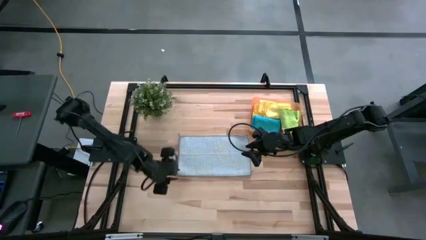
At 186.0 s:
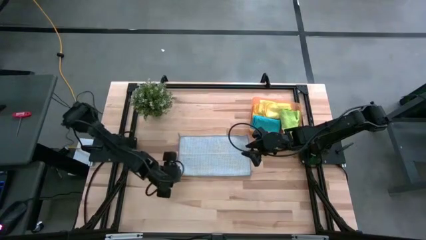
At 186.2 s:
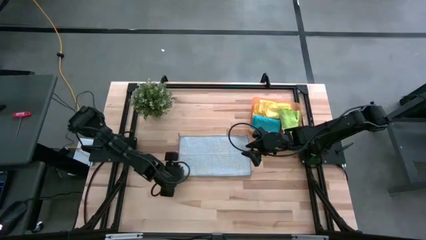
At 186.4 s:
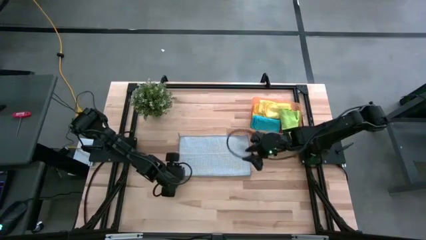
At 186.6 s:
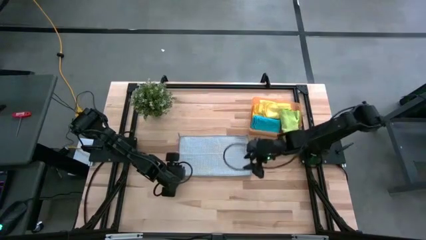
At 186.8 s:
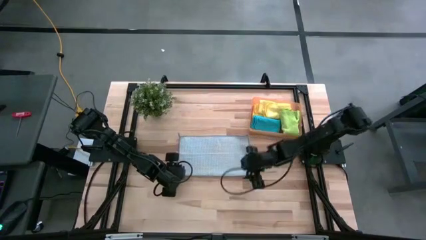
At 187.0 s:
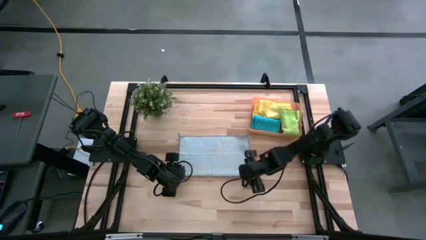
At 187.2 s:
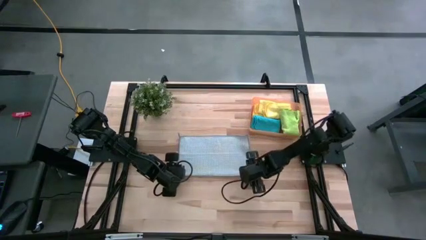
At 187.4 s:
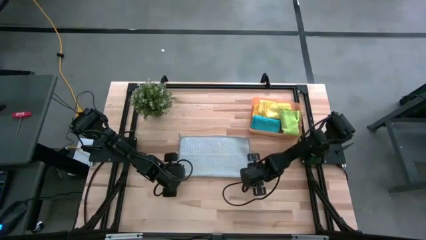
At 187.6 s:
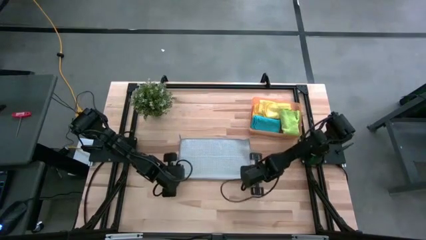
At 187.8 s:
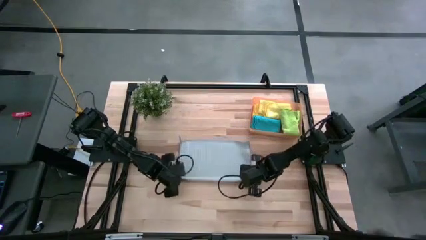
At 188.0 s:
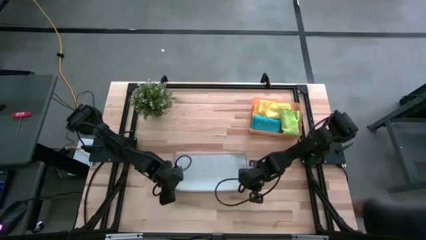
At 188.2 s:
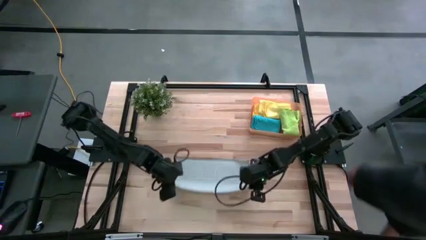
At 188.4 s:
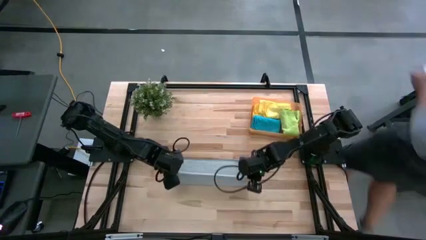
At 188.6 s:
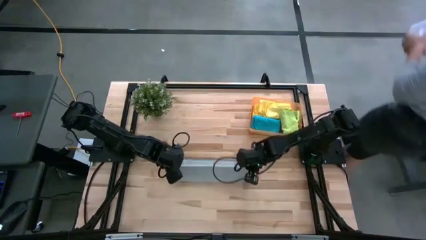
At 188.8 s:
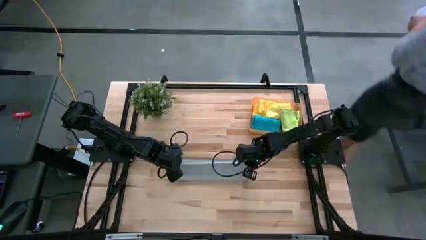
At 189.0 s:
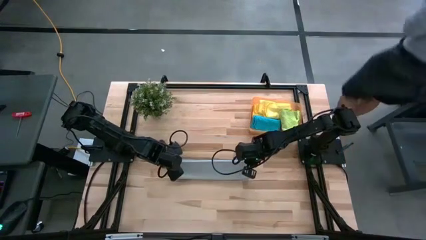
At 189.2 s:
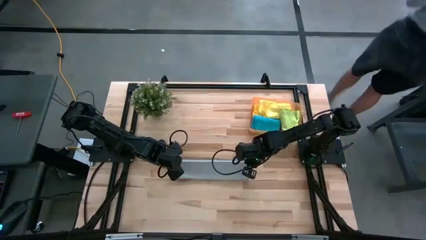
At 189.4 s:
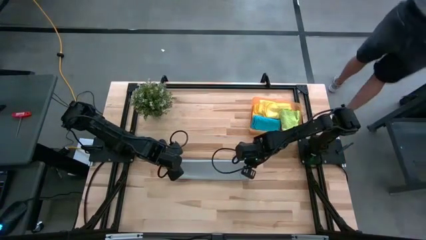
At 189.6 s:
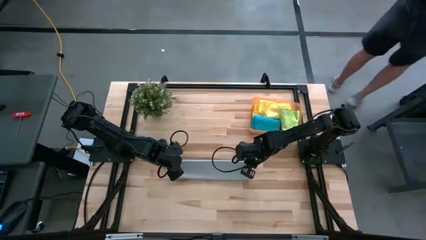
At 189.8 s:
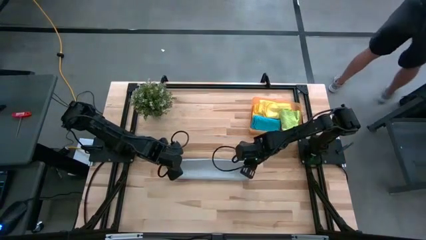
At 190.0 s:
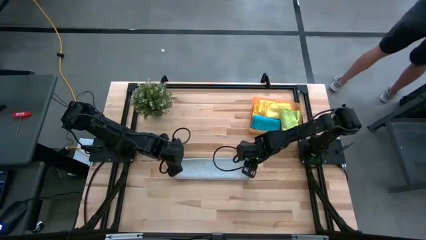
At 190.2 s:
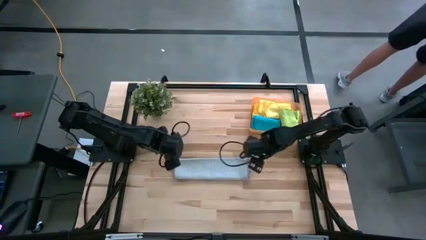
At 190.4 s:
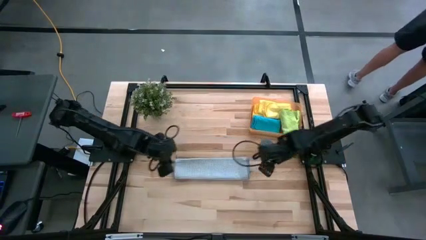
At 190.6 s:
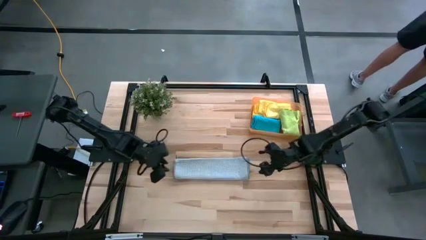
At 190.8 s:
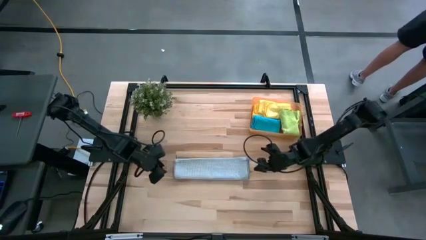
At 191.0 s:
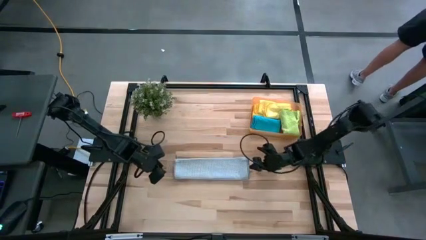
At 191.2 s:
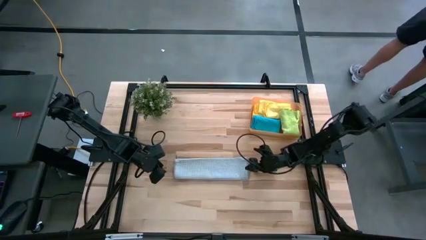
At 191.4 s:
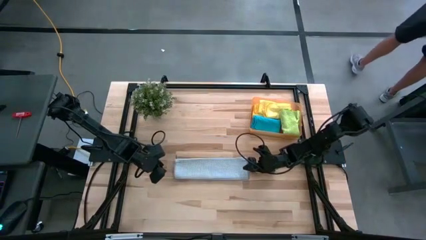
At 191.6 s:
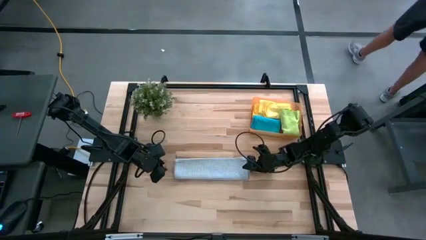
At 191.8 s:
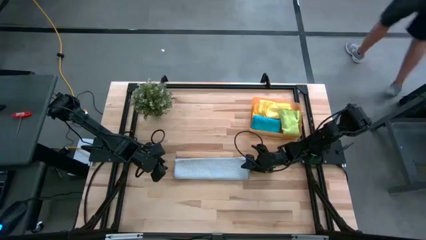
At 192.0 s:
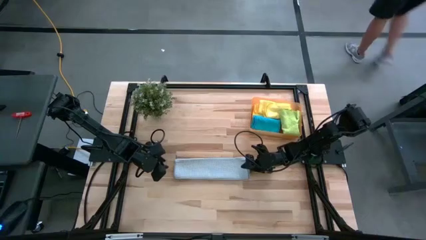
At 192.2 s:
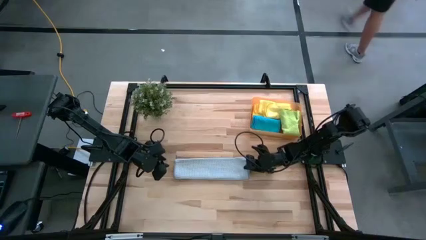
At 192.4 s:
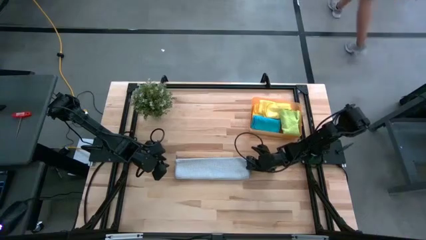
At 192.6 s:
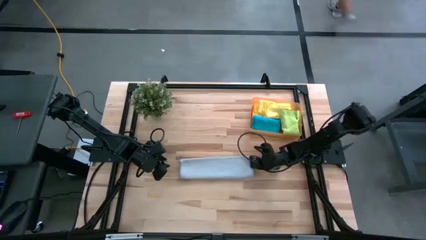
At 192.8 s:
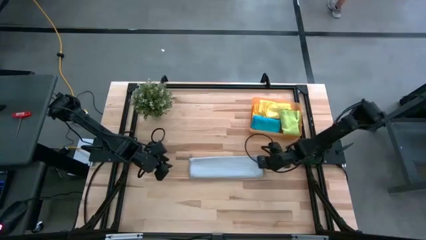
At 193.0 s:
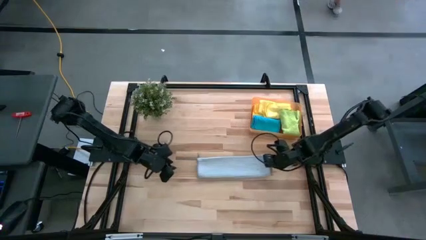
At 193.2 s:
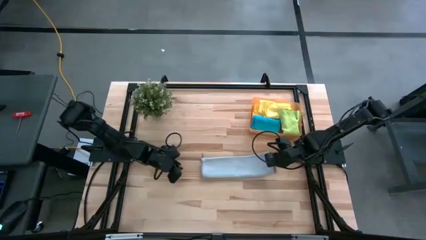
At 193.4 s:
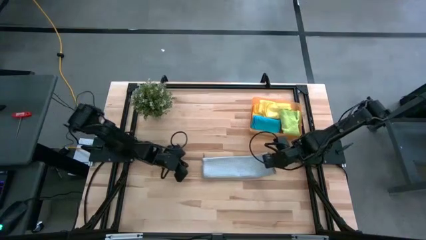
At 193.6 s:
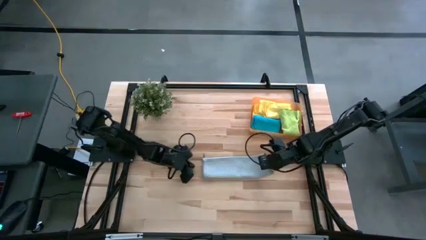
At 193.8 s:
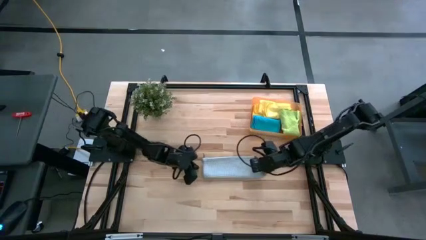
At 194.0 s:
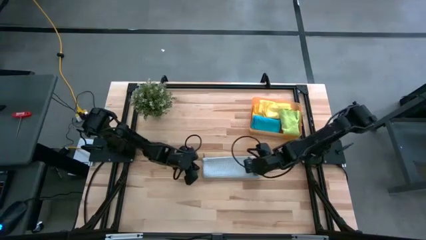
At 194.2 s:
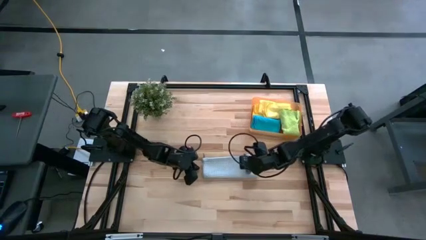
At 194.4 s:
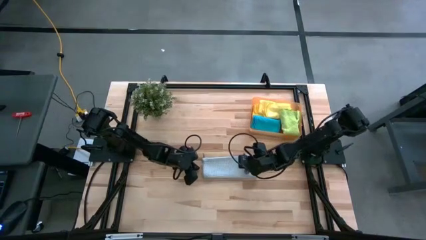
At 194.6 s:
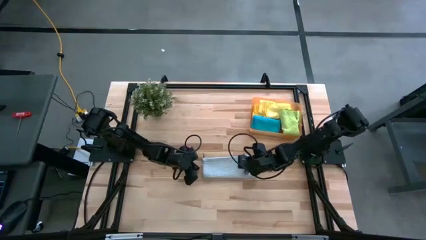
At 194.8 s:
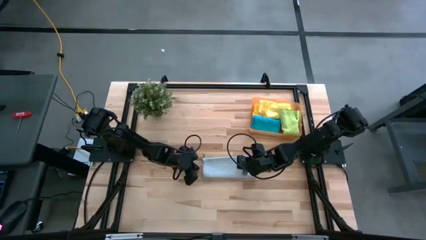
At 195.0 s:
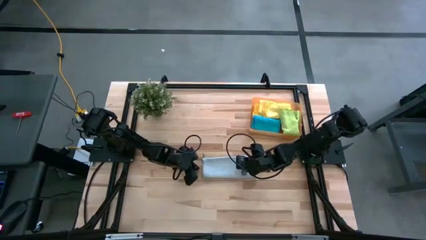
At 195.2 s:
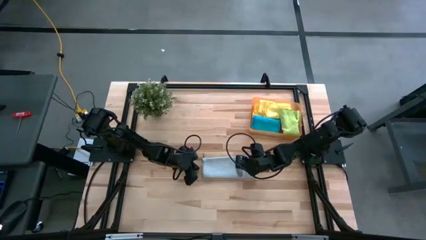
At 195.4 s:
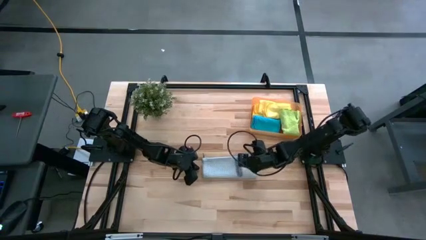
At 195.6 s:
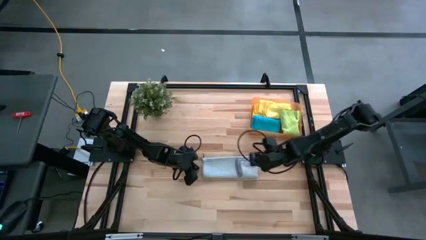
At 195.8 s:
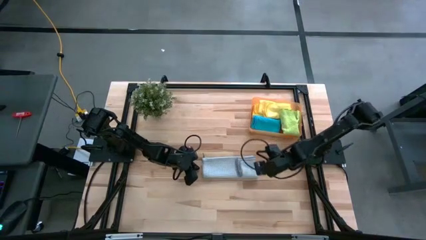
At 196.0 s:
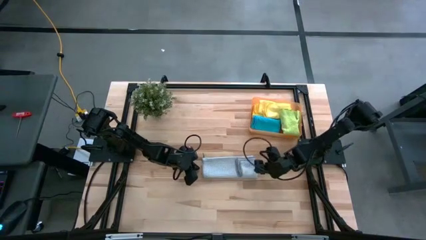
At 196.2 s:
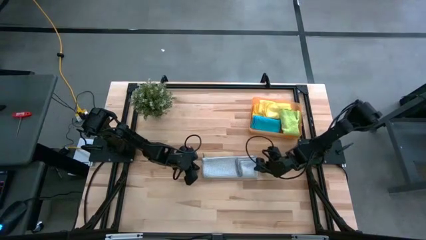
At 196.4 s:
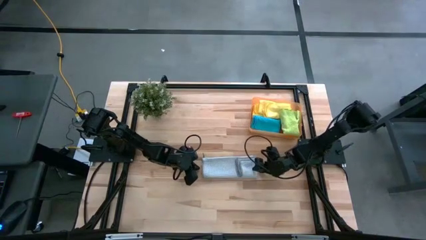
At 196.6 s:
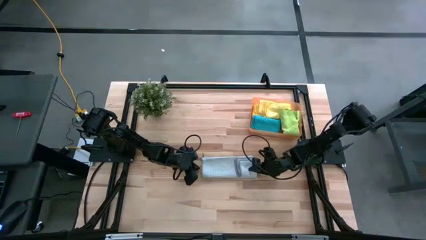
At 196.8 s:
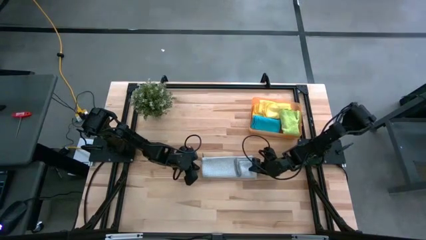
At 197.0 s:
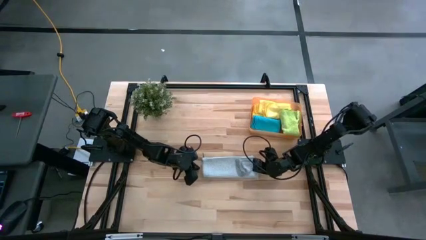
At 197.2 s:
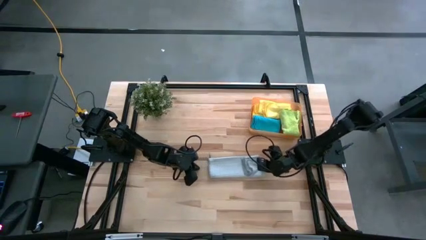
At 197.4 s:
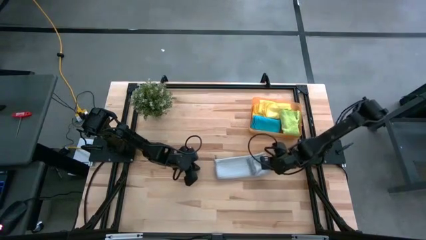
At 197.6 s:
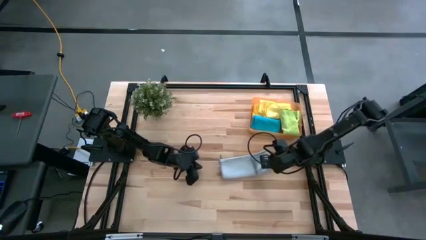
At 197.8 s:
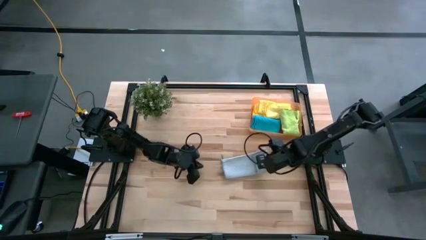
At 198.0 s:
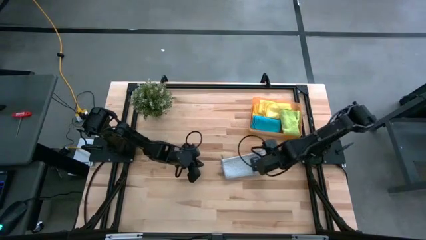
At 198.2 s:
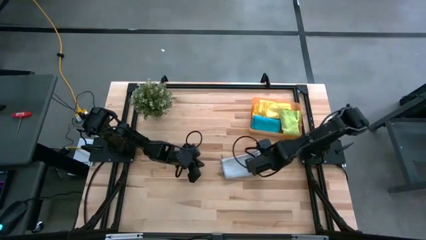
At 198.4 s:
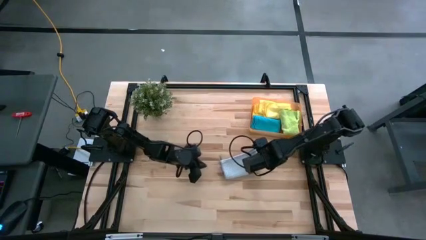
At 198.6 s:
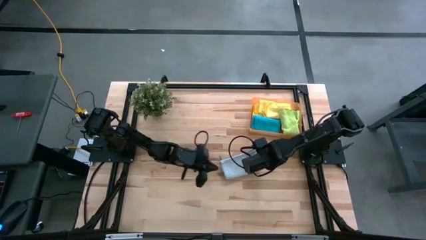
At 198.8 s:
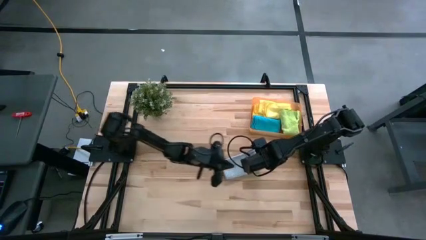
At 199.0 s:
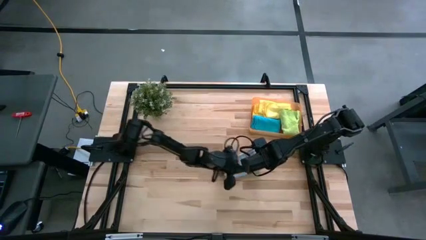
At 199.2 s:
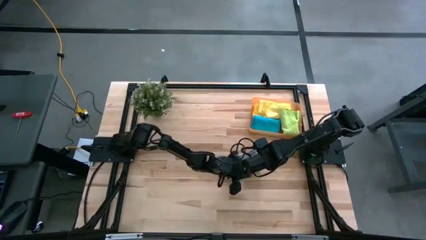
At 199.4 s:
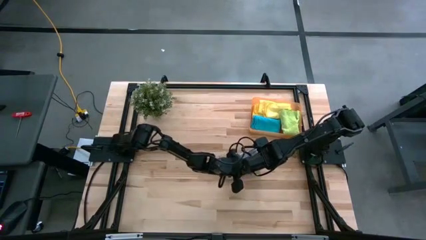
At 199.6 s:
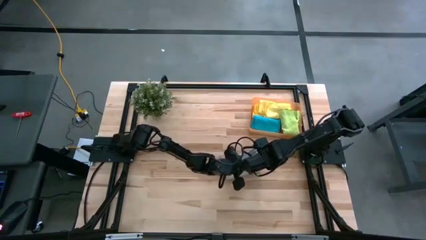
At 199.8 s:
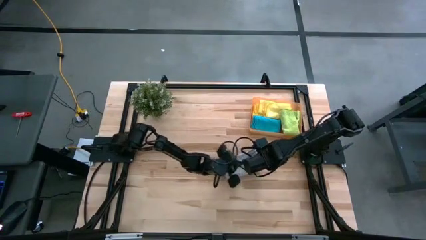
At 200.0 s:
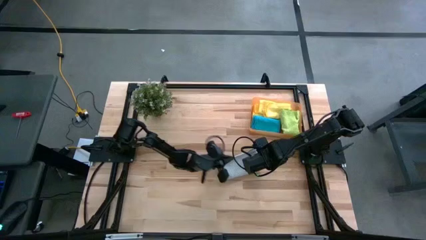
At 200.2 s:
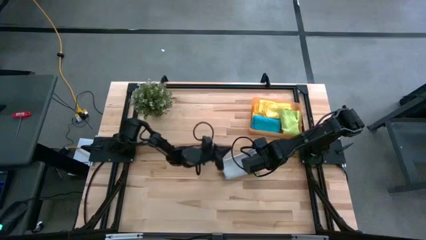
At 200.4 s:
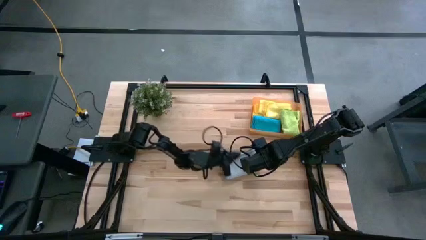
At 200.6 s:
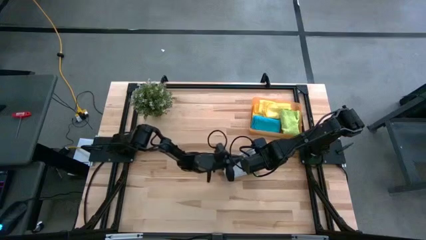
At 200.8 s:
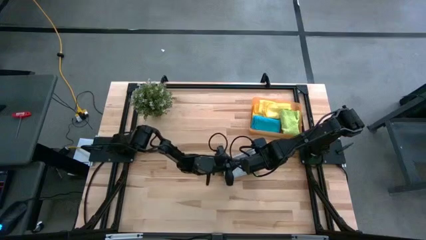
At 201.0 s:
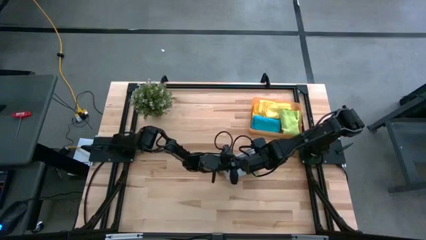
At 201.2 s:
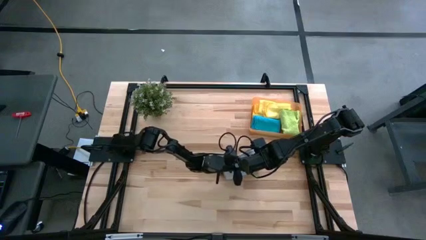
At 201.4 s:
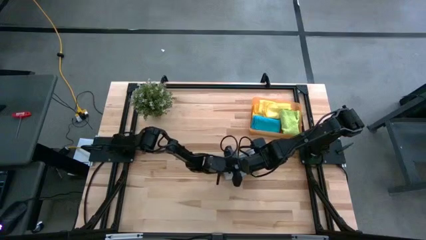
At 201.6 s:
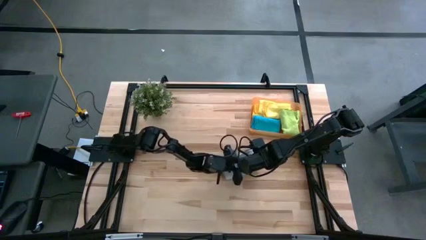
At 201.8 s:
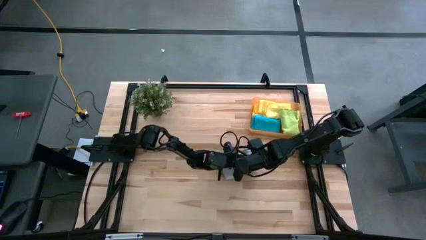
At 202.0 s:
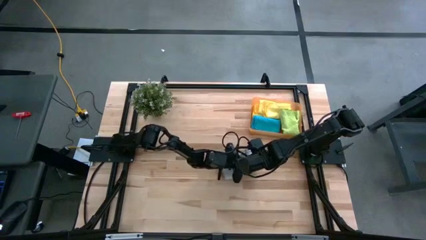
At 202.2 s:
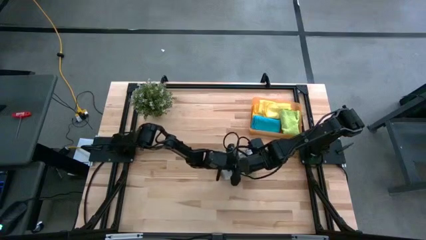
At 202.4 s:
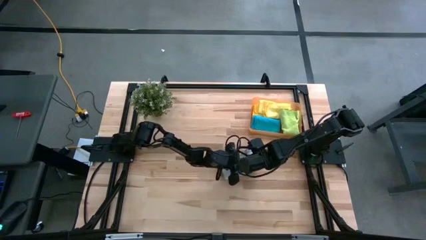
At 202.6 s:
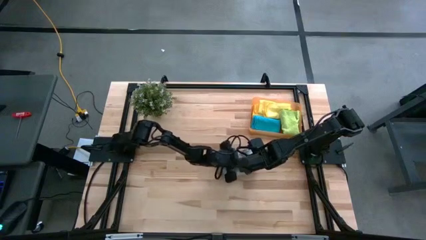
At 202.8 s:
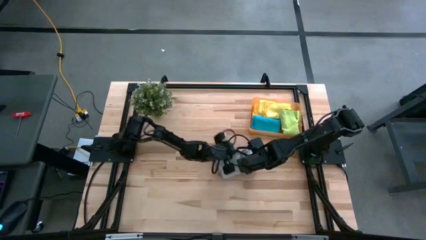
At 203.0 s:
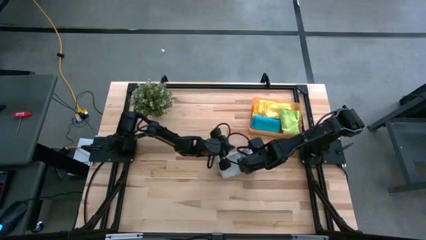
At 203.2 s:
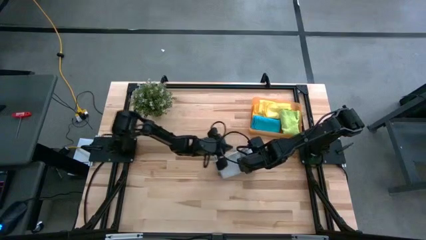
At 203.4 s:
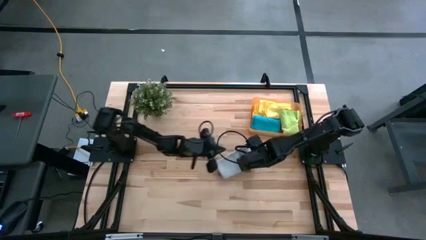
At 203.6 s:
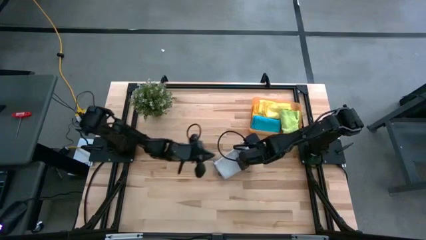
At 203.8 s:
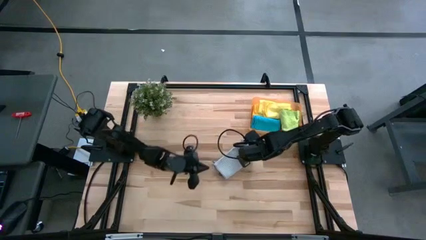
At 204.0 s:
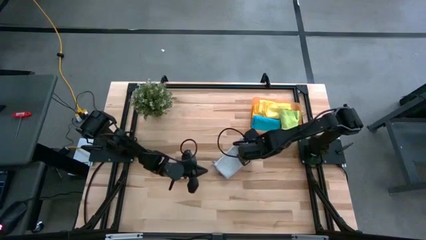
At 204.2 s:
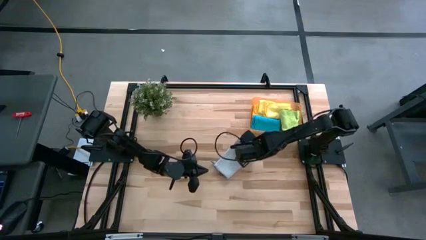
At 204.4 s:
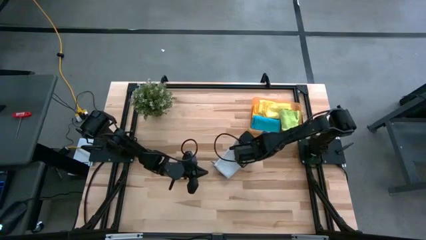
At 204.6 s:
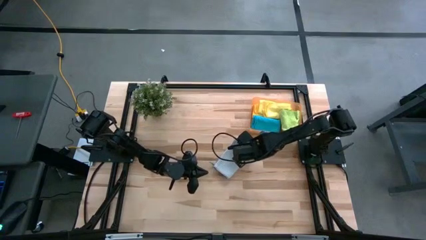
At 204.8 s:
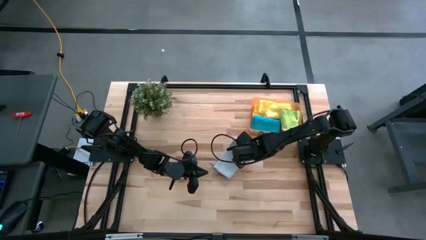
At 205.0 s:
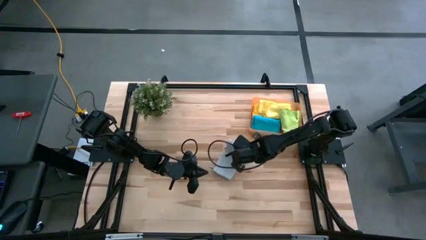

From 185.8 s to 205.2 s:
Task: Fold microfiber towels
Fold the gray microfiber cloth
